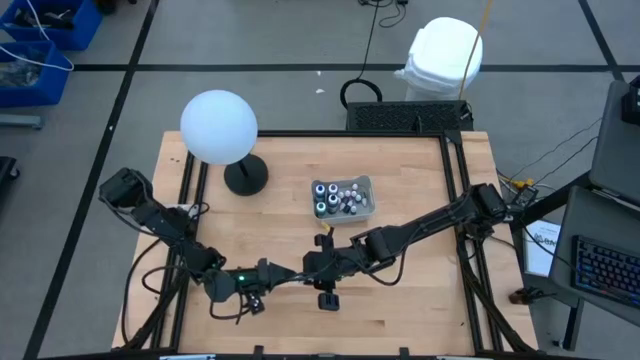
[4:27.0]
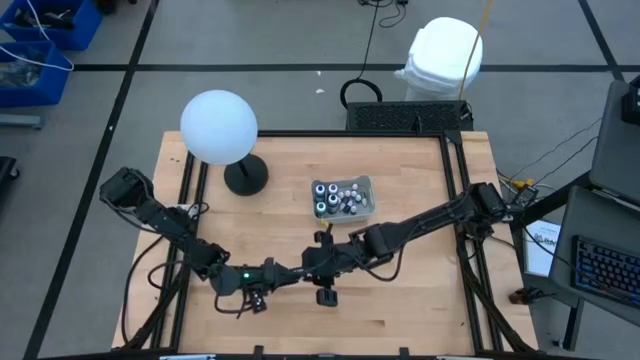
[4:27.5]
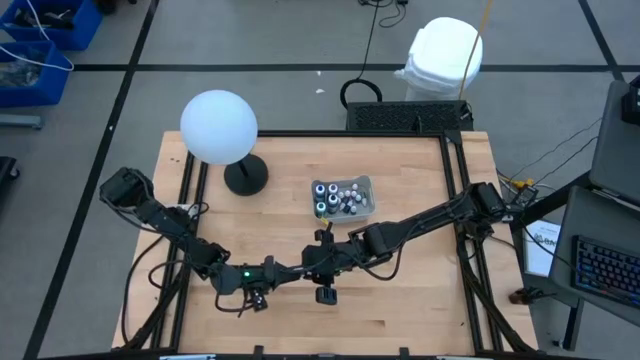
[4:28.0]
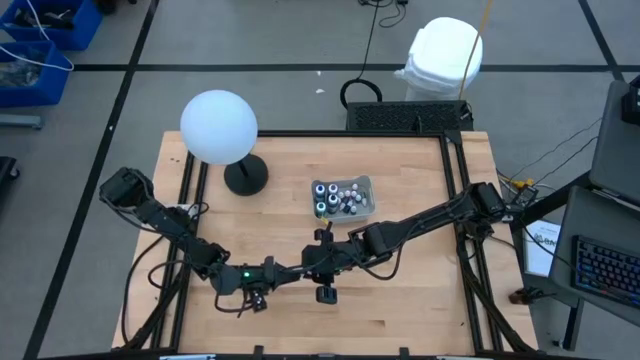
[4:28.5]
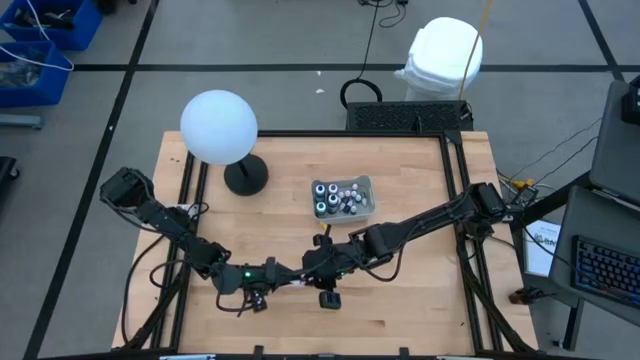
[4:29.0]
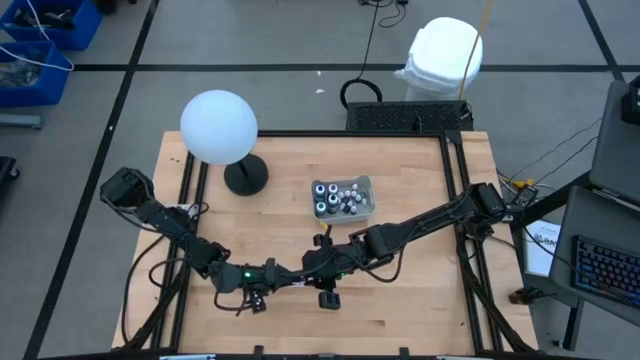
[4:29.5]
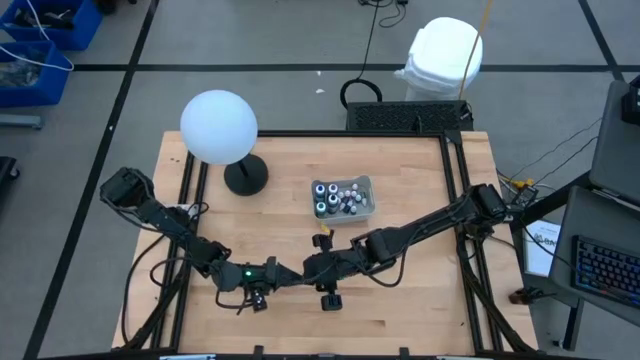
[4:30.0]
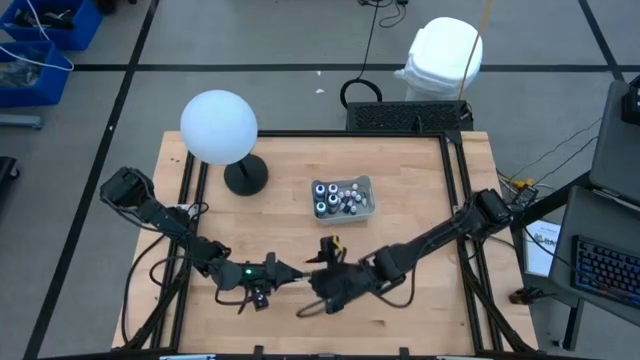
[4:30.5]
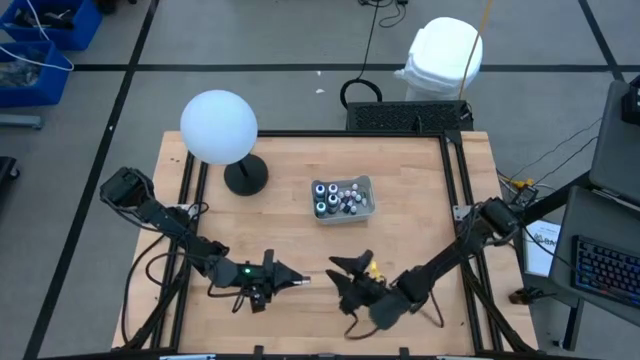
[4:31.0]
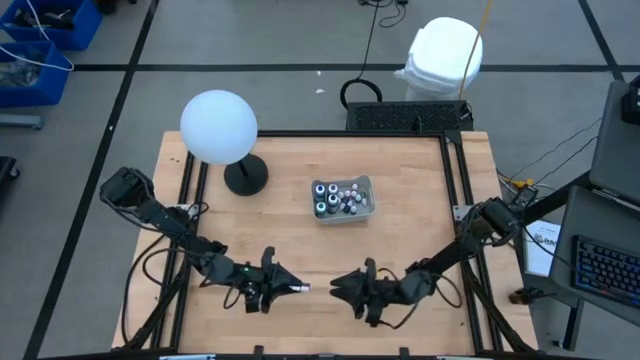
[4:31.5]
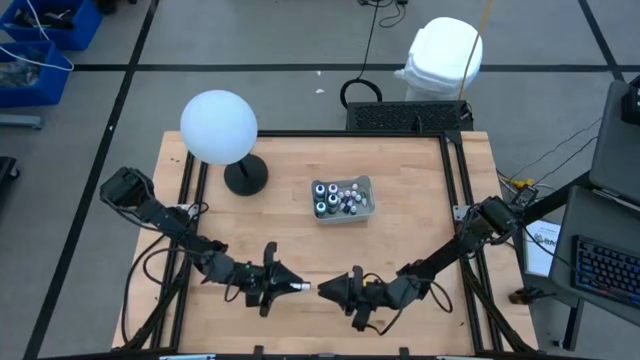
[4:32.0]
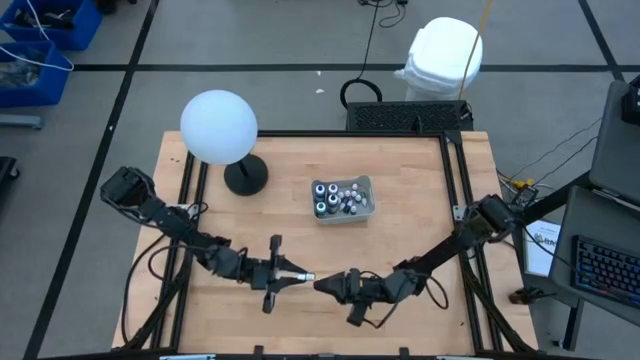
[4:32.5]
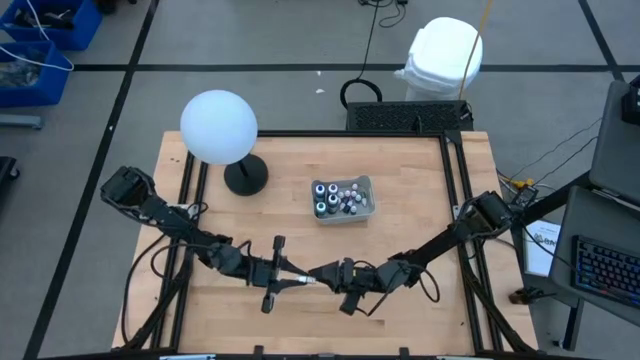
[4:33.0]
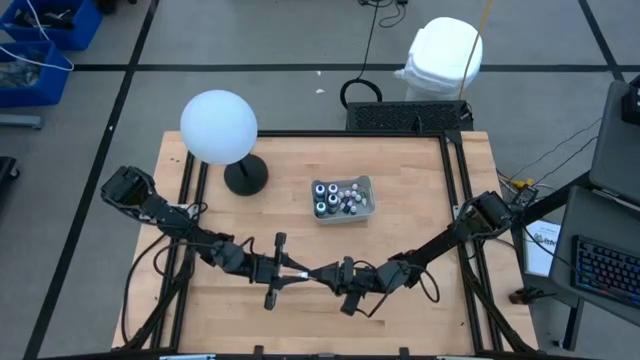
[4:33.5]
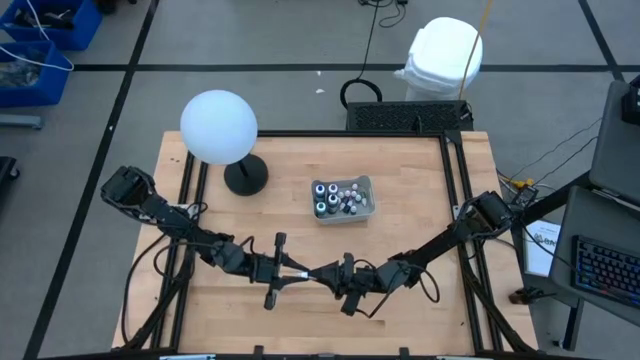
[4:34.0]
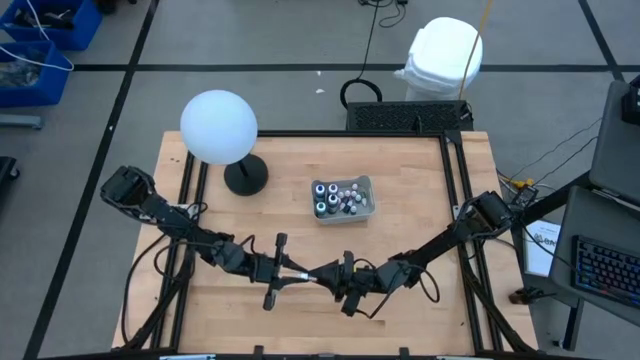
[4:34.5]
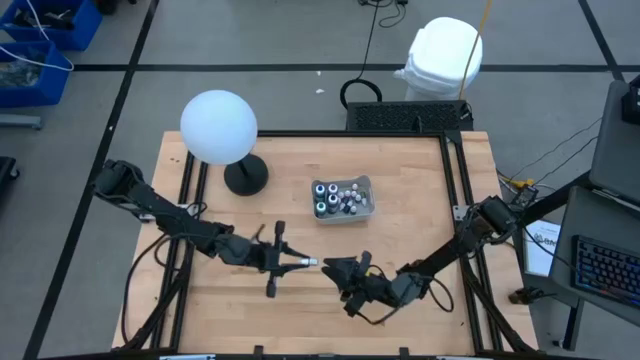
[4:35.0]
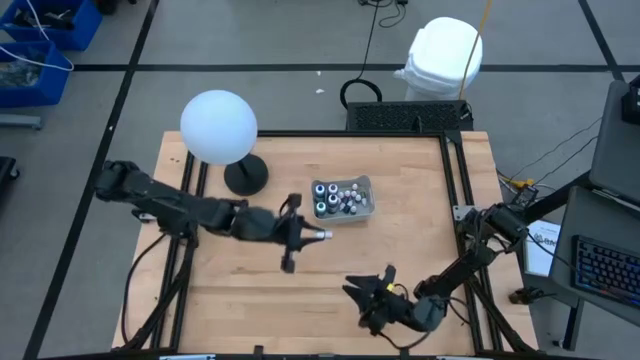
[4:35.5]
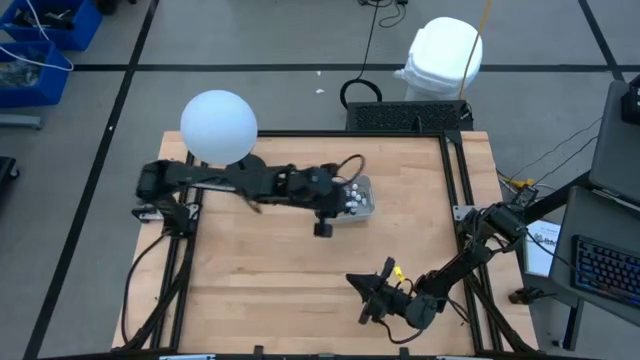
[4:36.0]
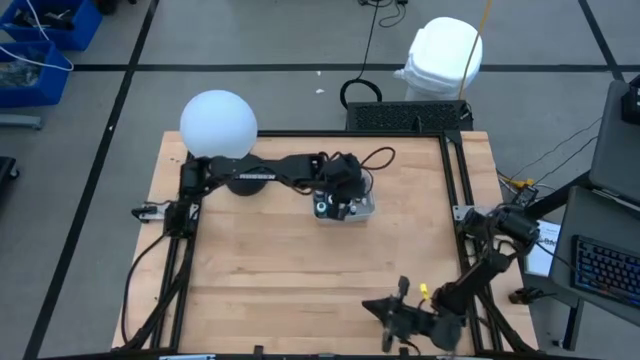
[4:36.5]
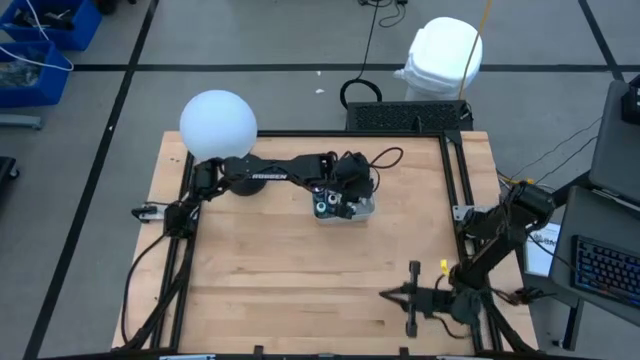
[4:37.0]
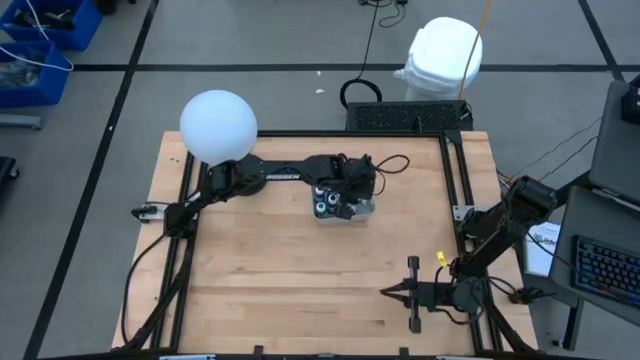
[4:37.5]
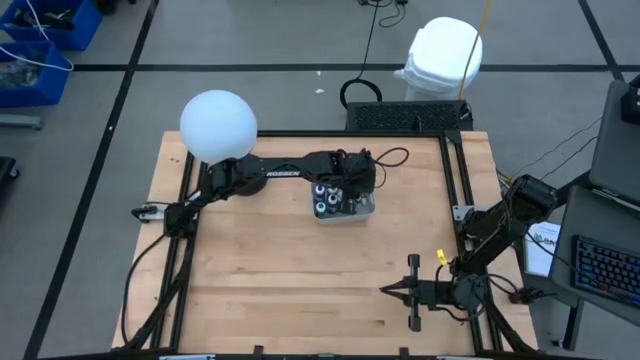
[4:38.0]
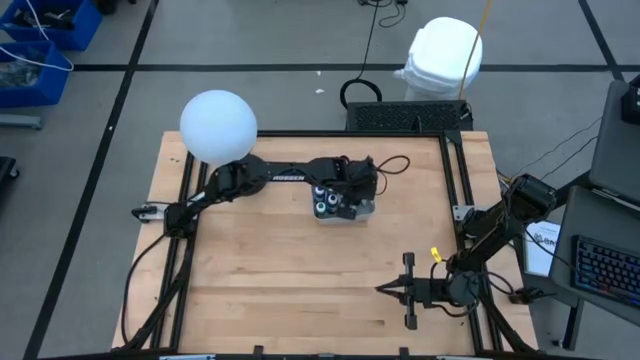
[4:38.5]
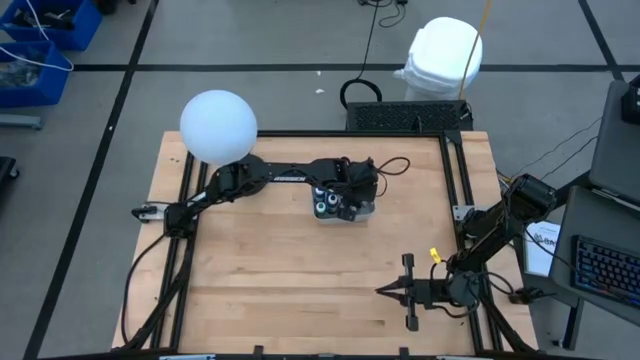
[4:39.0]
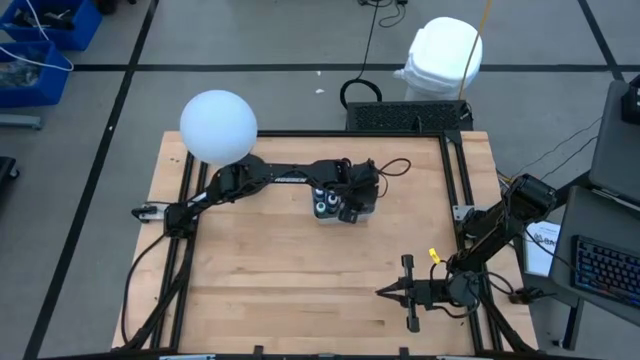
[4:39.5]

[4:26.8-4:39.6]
Task: Pick & Place food coloring
Put the small red food coloring bottle into the gray bin

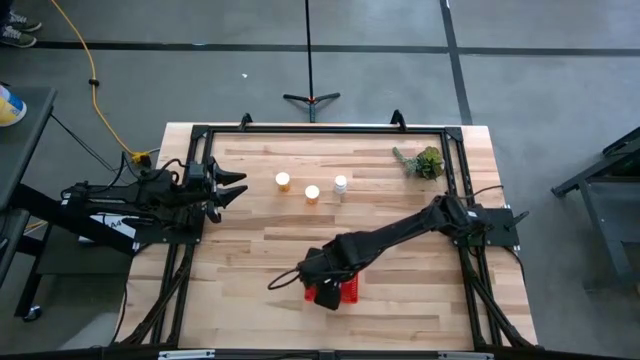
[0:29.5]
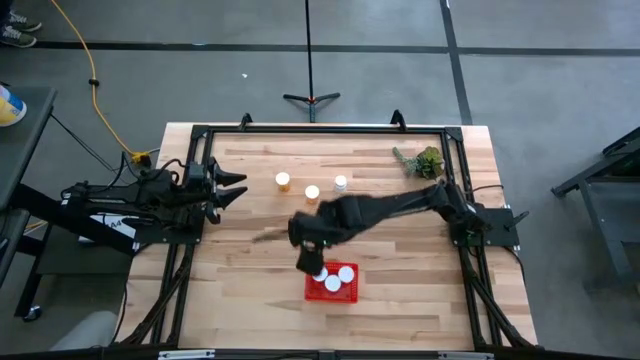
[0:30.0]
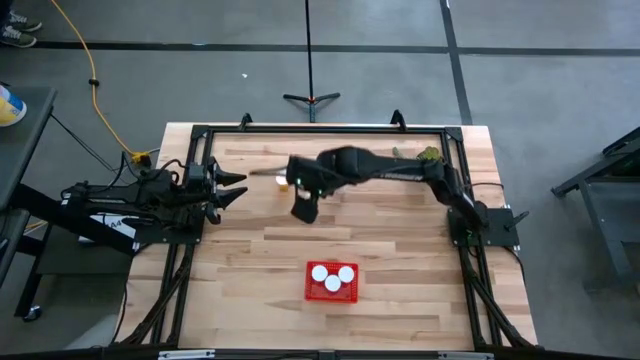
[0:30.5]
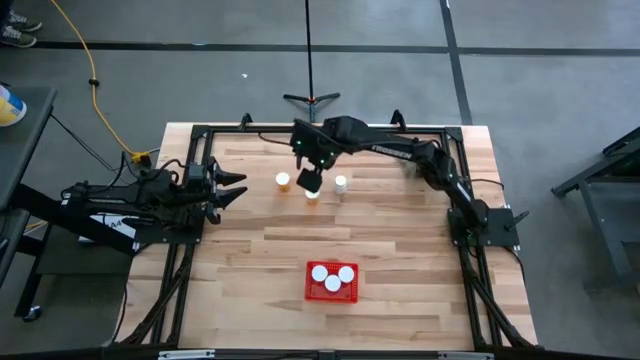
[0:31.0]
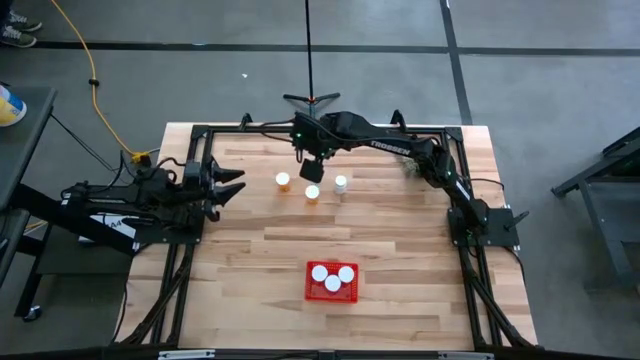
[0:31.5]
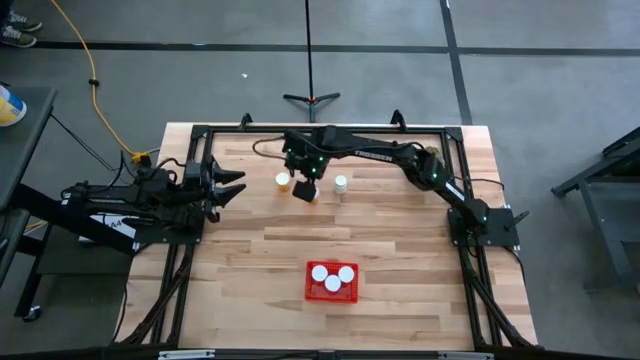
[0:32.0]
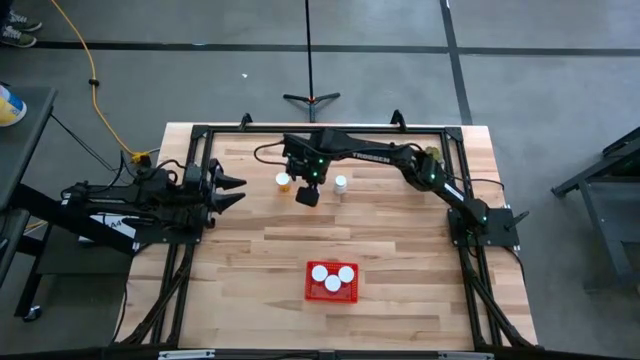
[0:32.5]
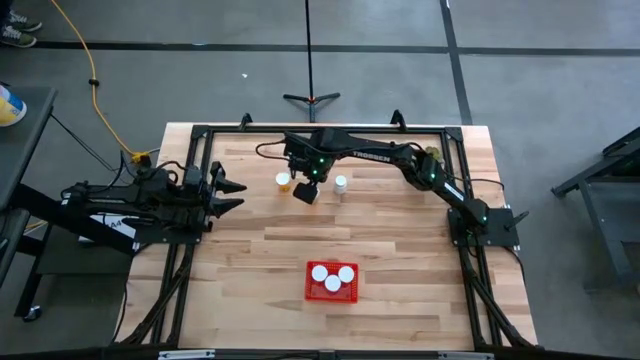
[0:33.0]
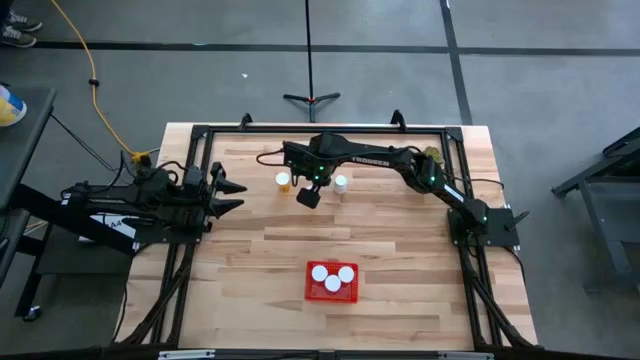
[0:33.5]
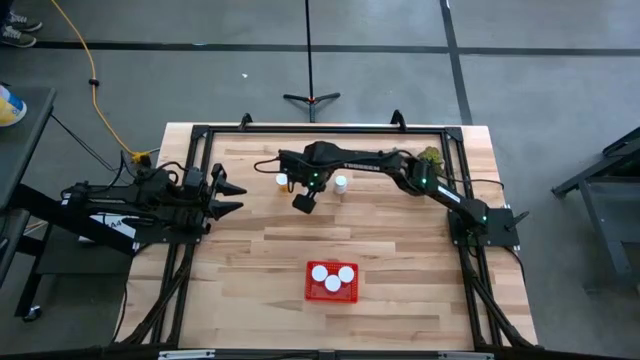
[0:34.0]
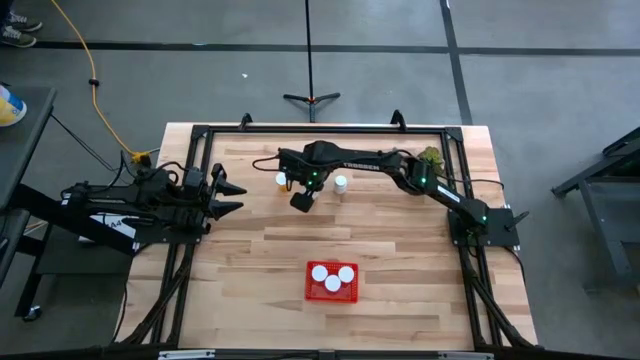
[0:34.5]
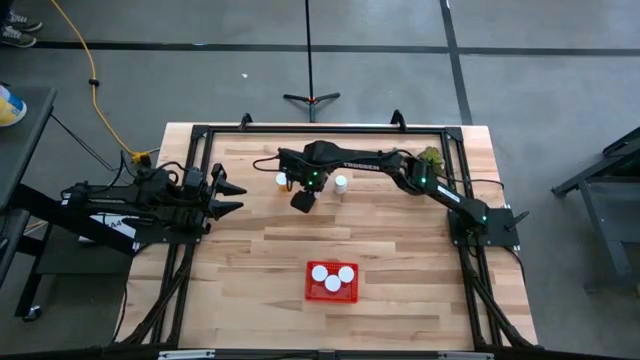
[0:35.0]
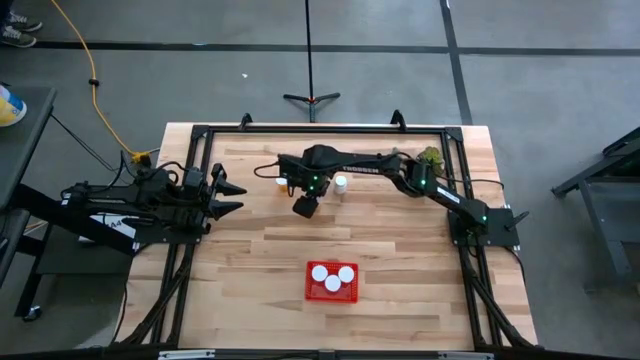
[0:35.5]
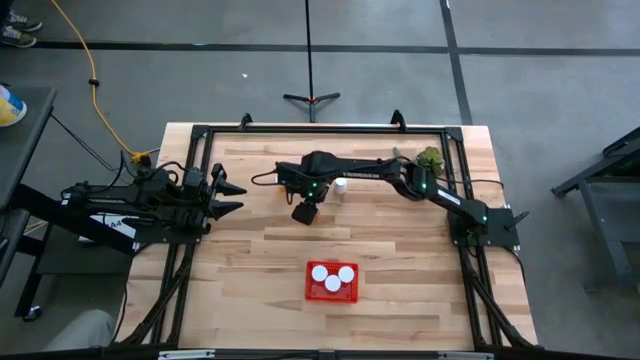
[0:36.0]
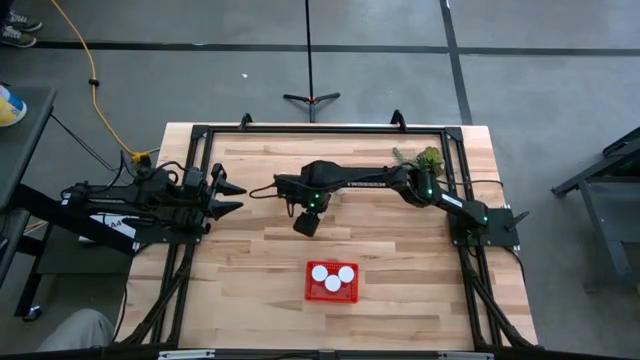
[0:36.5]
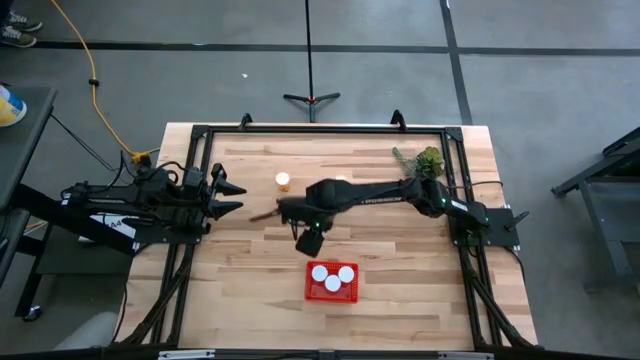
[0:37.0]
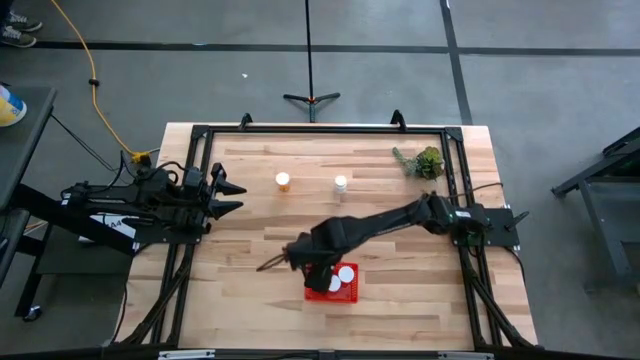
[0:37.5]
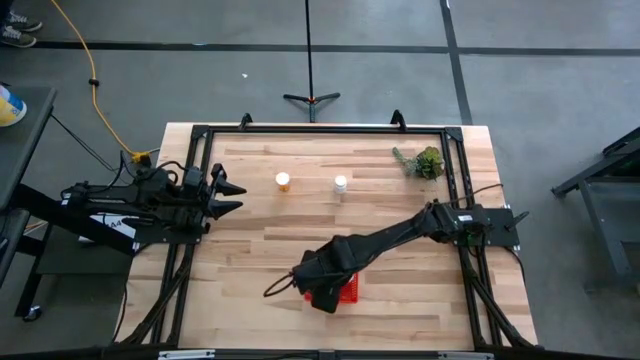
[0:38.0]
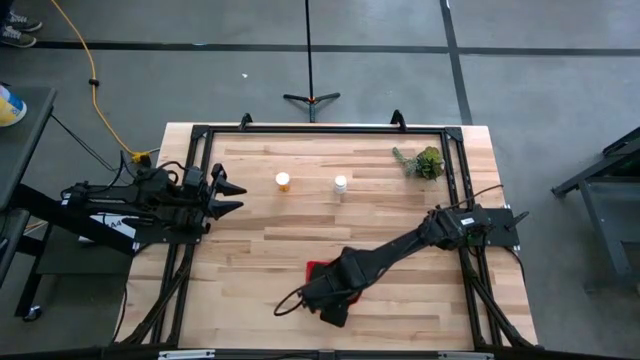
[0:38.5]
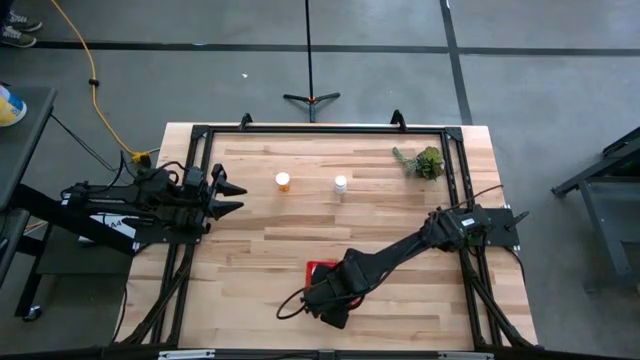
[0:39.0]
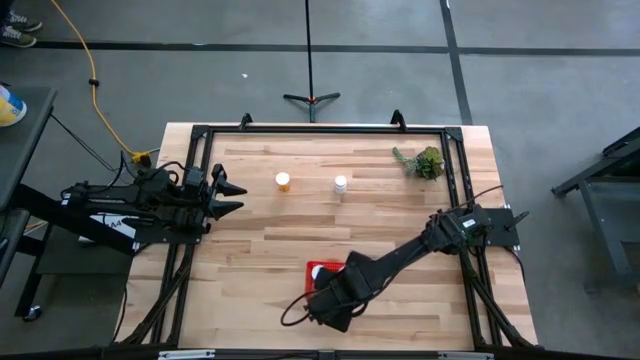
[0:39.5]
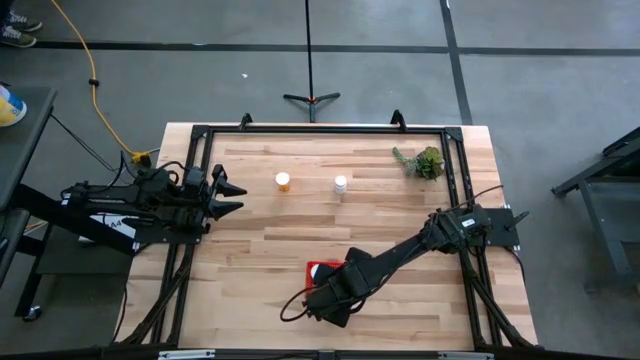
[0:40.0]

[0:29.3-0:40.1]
Task: Pick and place pill bottles into a basket
Put the orange pill bottle into the red basket
